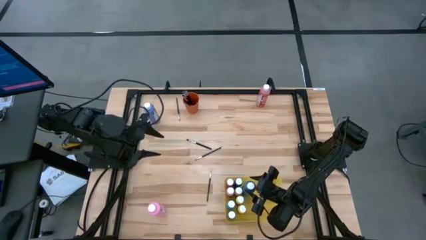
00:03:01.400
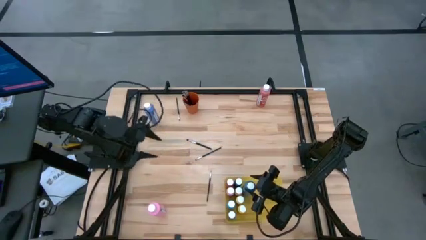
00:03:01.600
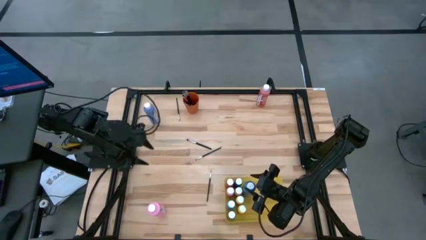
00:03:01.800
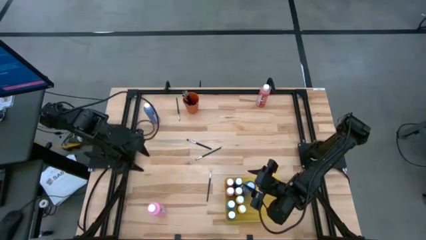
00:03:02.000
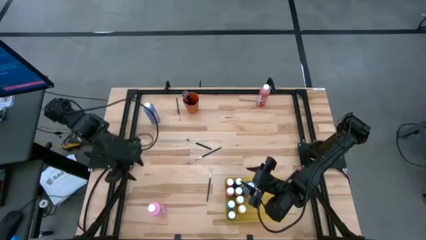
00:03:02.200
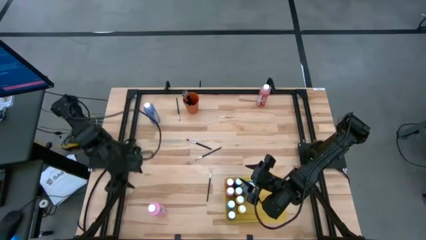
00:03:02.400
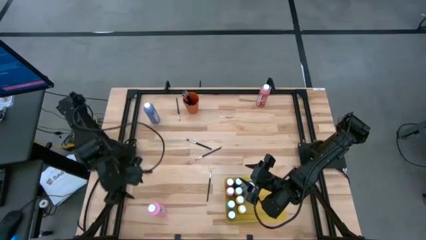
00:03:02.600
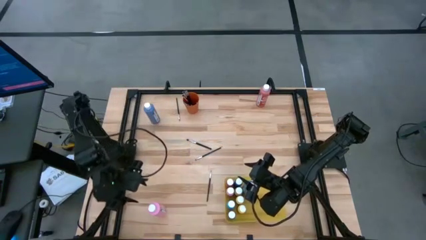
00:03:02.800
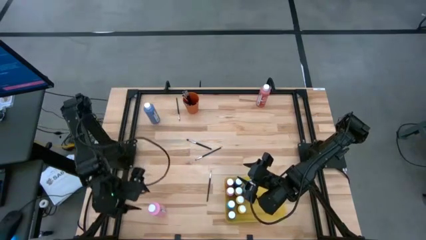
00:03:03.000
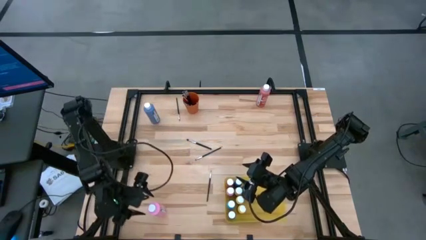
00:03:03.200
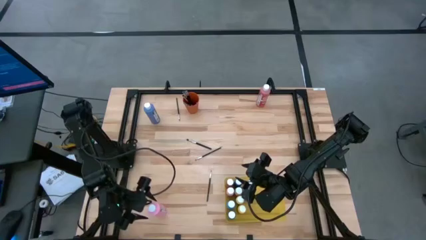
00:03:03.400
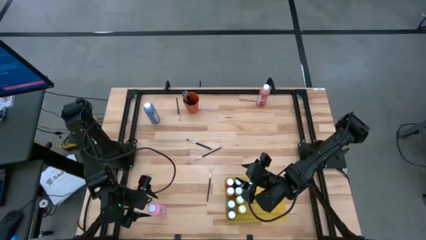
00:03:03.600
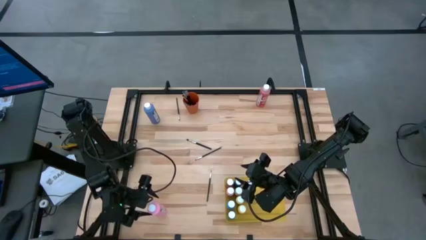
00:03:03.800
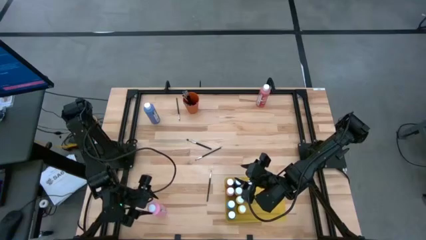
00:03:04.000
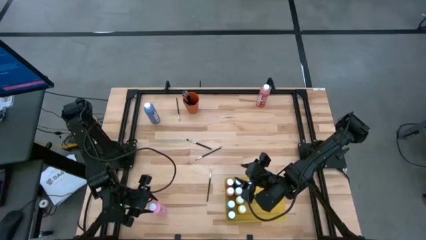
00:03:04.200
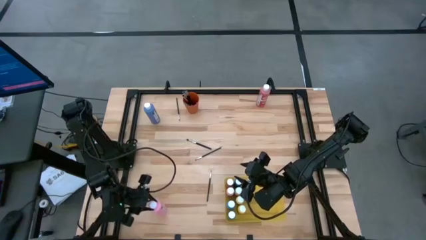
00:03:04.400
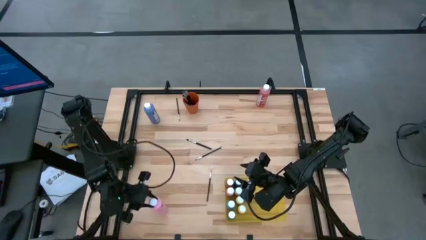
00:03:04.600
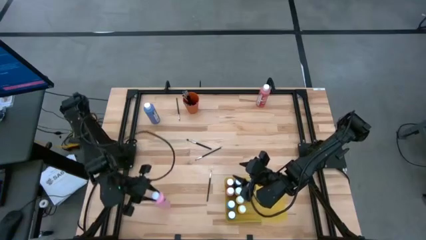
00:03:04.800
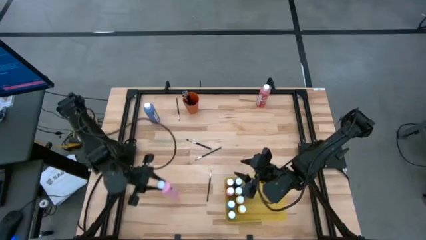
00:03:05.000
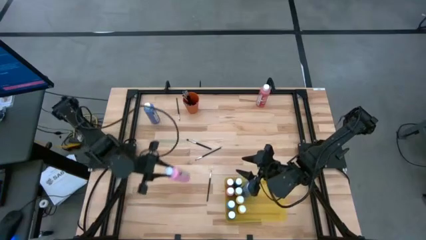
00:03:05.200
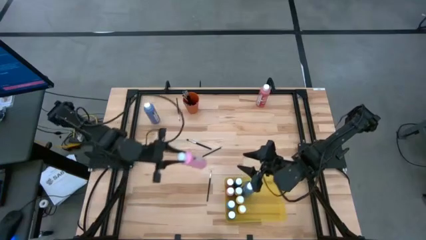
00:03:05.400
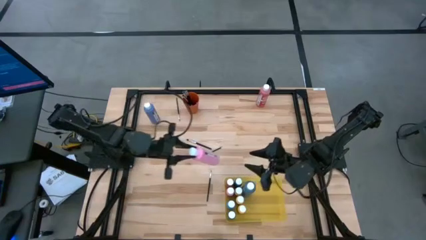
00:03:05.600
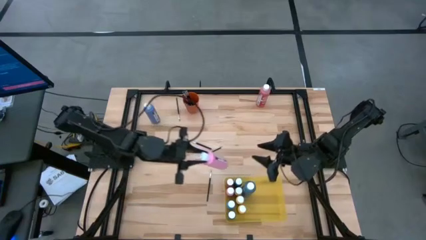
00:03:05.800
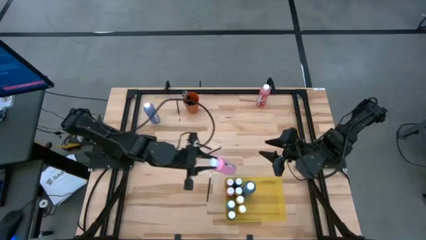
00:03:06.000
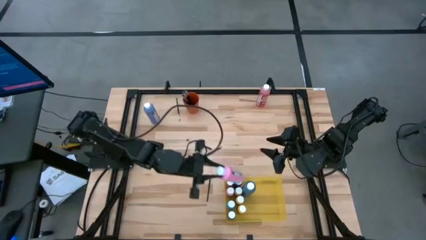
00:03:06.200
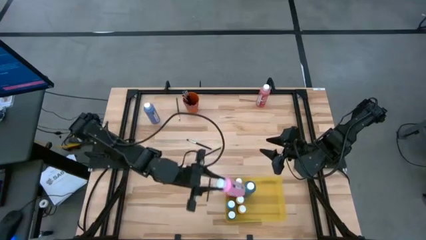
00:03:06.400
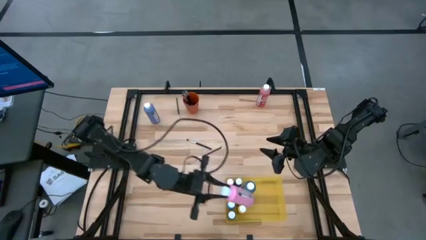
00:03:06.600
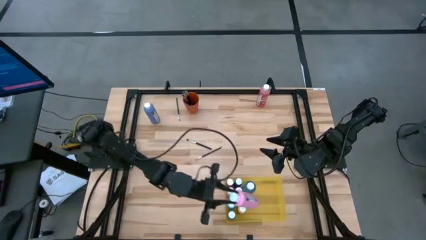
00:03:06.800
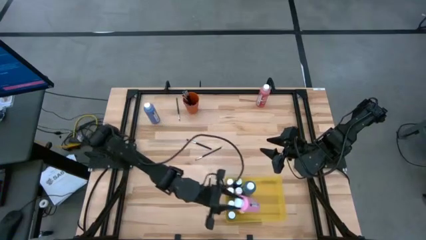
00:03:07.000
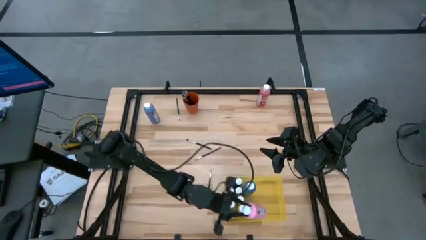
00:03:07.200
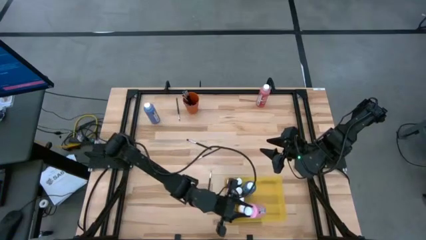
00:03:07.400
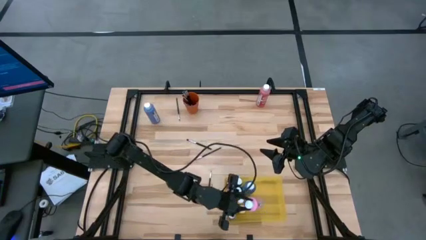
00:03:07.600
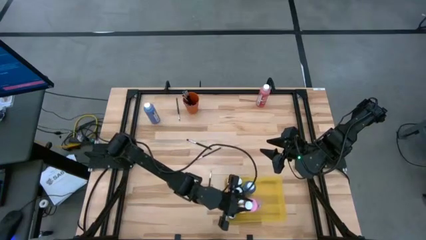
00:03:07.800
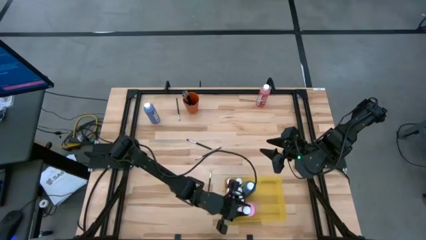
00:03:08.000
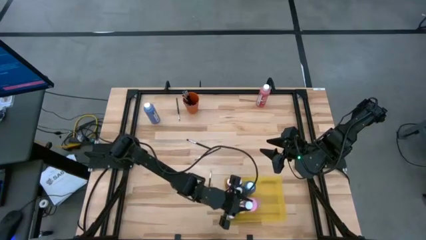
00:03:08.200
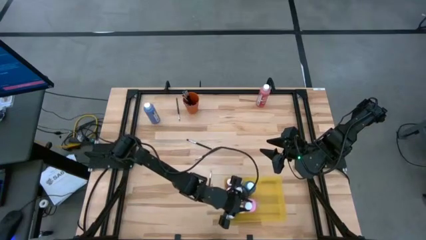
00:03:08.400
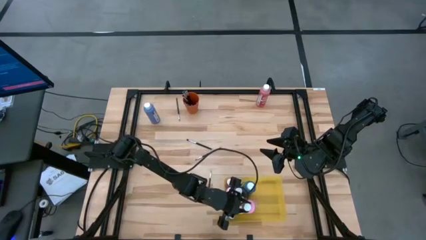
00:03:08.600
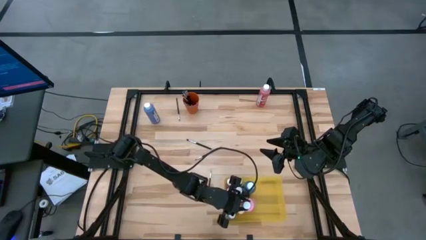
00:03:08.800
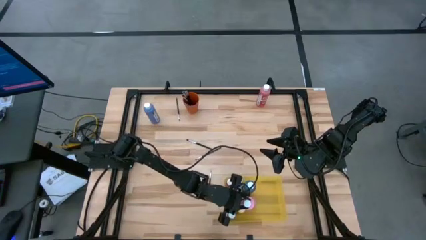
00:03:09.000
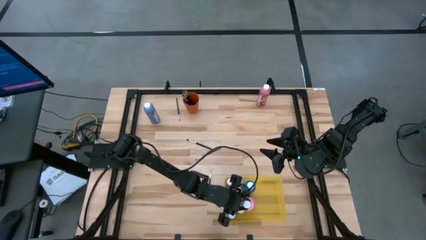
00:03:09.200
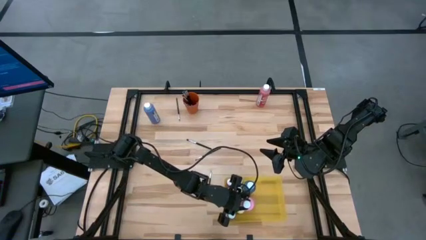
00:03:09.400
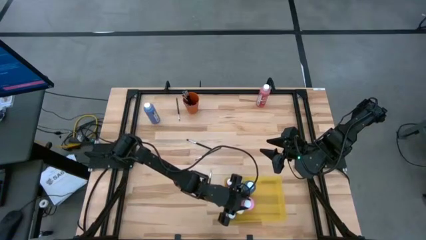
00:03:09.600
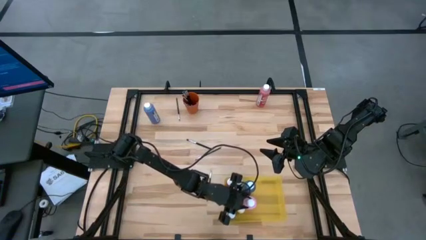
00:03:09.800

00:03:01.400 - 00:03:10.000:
Task: Pick & Place Paint Supplies
Put the pink paint bottle into the yellow bin

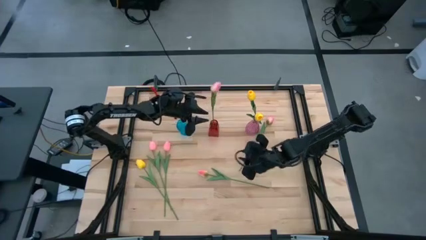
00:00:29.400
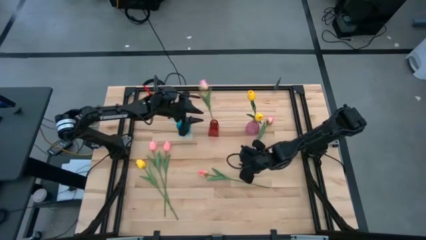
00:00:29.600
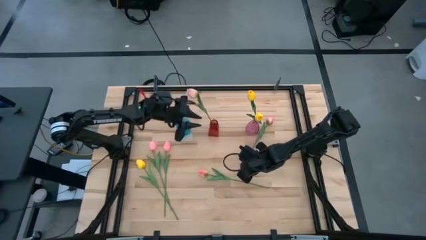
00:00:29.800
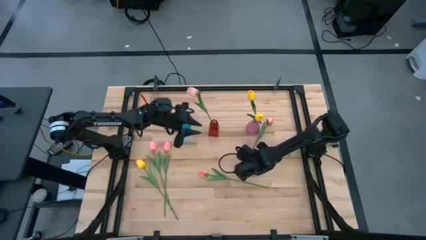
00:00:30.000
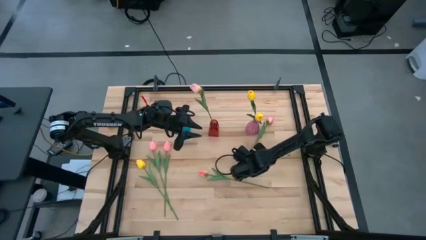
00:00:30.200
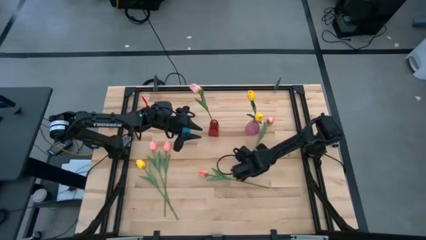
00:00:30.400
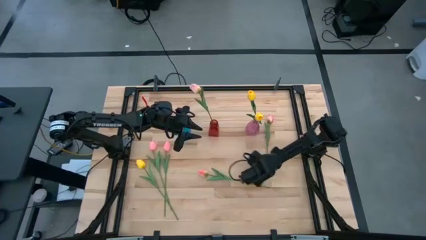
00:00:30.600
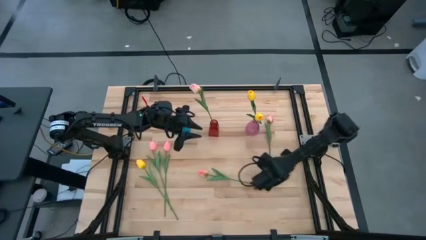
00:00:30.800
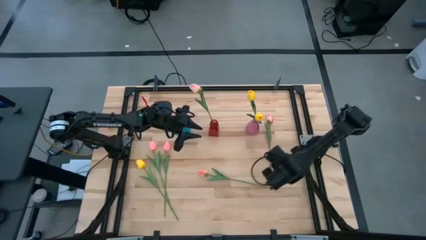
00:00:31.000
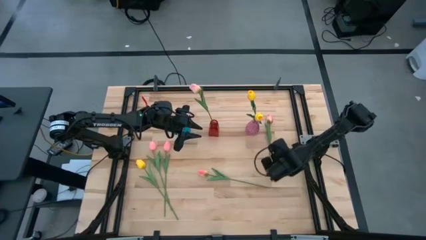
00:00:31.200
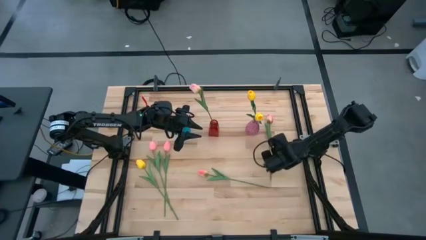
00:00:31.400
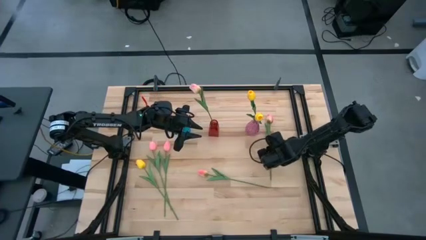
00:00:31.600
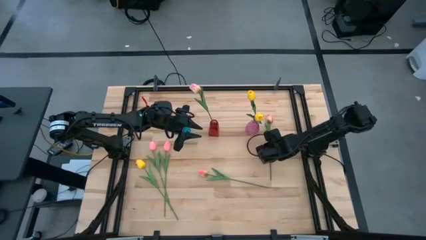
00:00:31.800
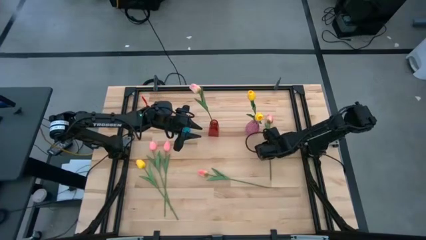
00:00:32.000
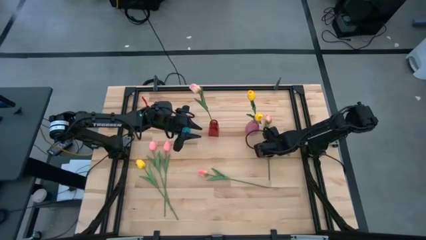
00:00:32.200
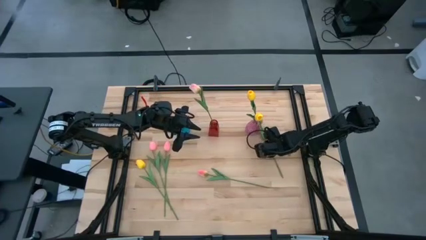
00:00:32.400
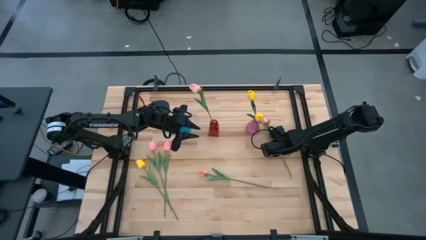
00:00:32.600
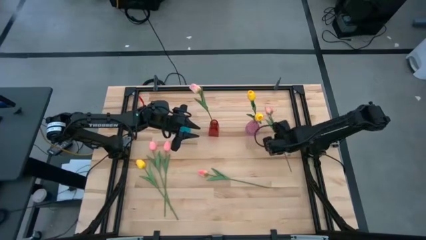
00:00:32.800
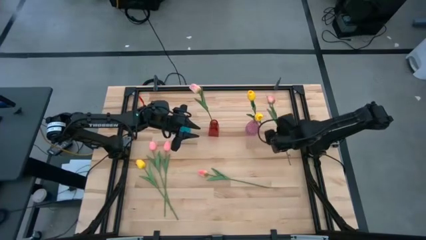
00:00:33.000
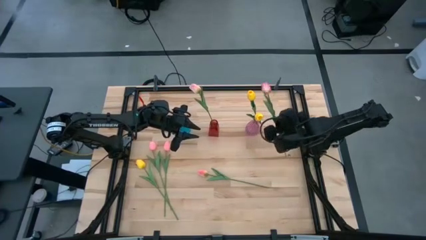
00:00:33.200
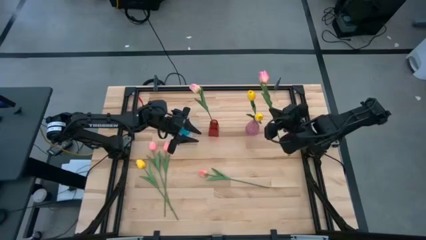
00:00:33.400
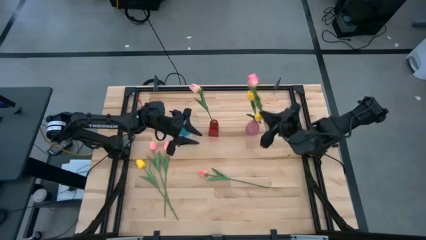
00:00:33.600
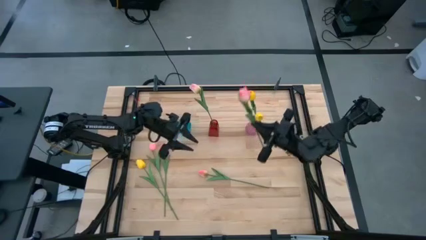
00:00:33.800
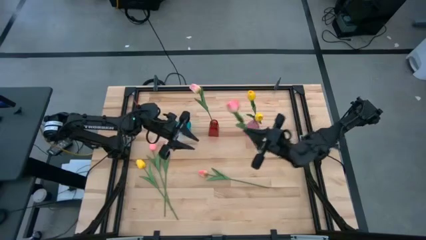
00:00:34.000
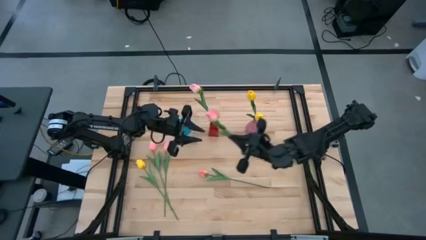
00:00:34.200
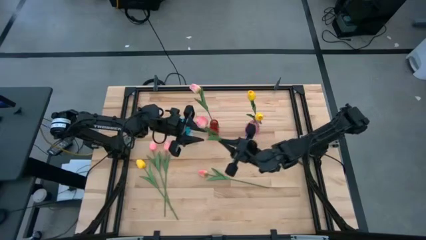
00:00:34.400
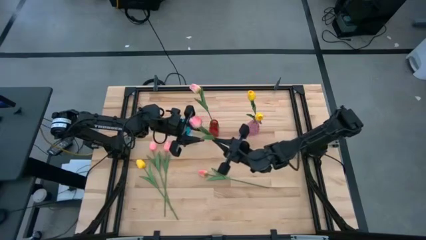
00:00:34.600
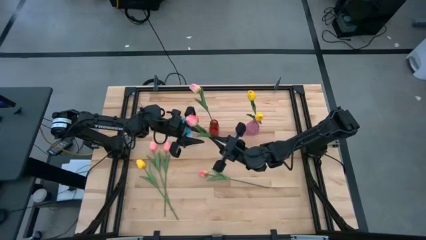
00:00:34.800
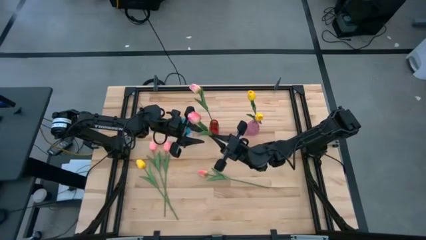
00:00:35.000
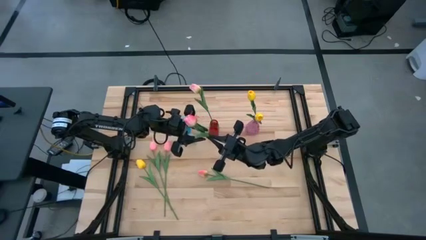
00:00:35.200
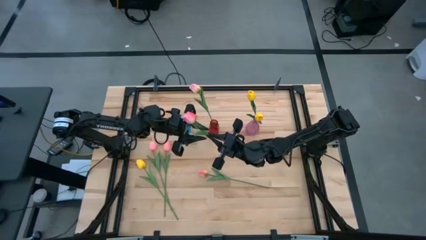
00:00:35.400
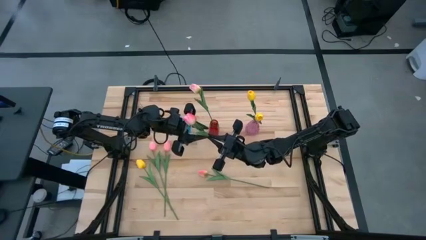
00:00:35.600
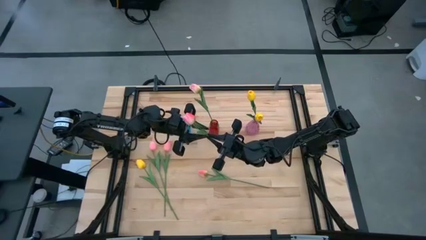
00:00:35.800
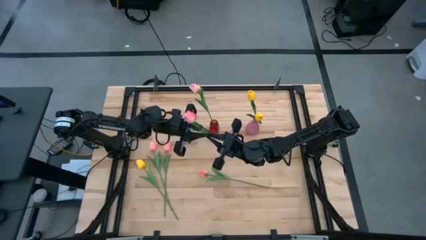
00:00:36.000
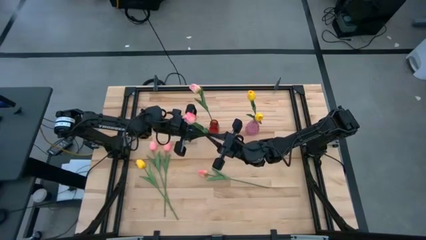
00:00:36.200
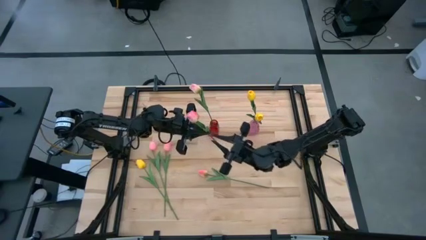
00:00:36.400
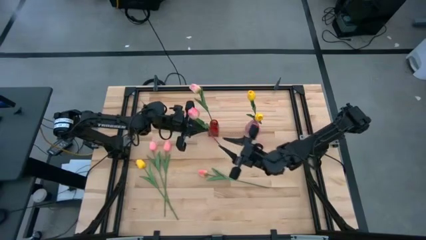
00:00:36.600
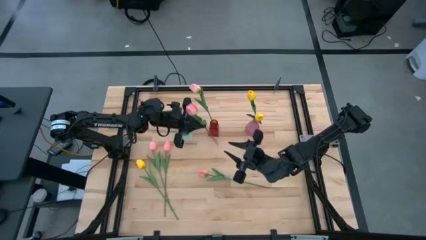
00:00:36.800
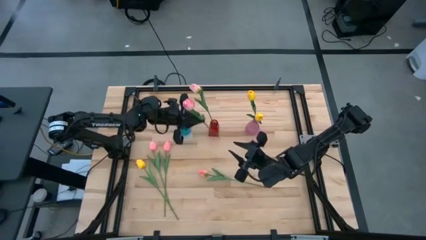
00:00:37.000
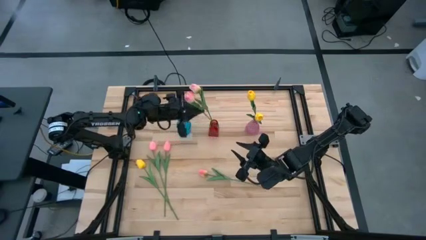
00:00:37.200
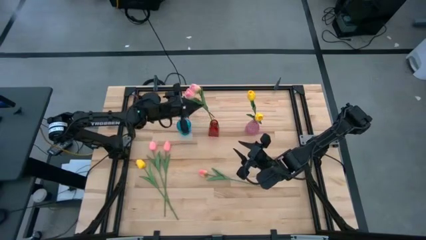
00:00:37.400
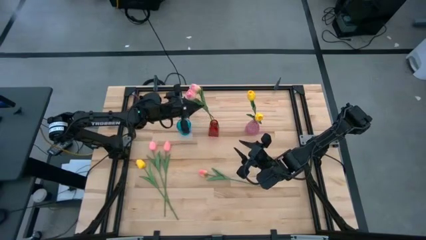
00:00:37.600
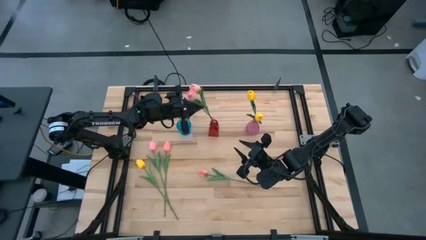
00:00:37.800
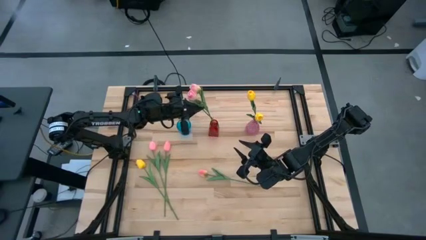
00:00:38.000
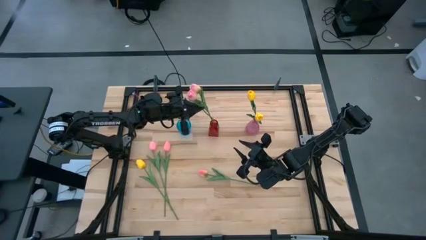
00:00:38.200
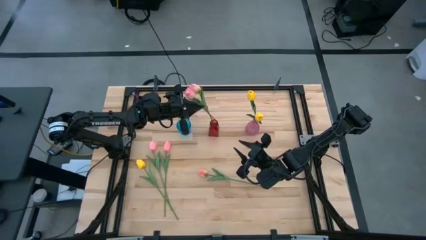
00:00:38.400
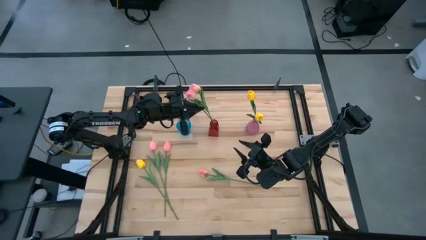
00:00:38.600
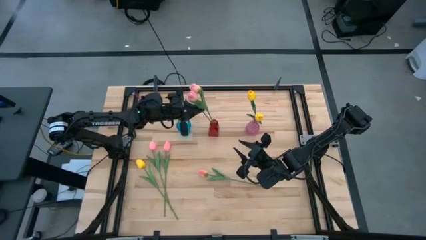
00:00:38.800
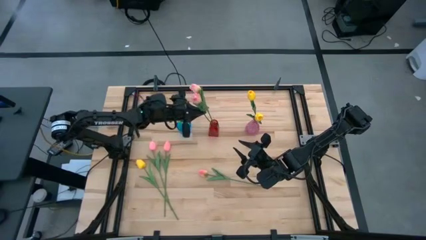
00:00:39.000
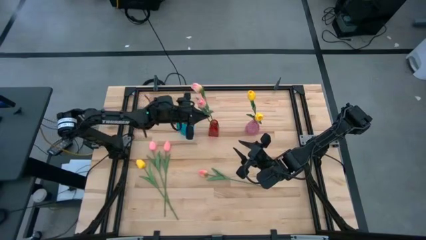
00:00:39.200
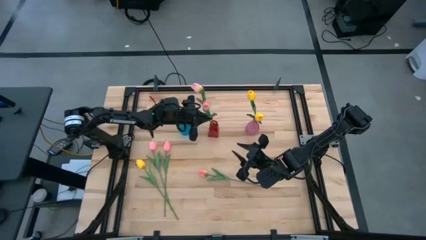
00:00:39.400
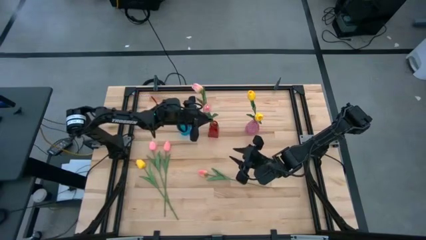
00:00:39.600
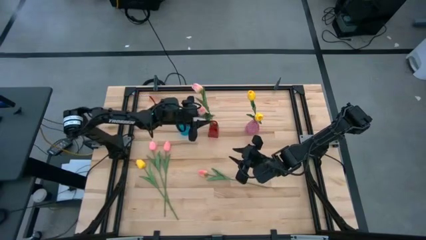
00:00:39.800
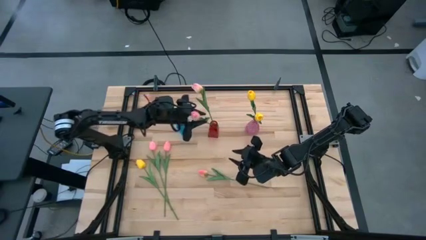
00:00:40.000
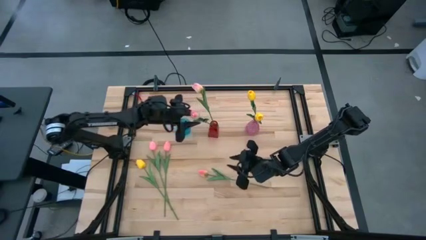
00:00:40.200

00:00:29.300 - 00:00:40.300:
Task: Sort flowers into vase by color
Put the top pink flower into the red vase
